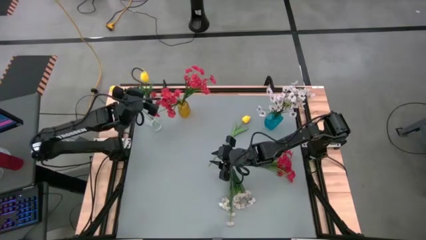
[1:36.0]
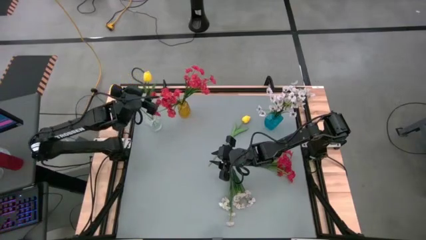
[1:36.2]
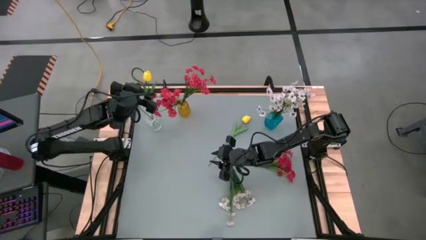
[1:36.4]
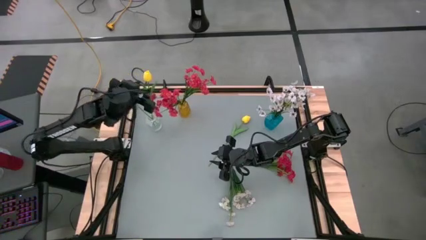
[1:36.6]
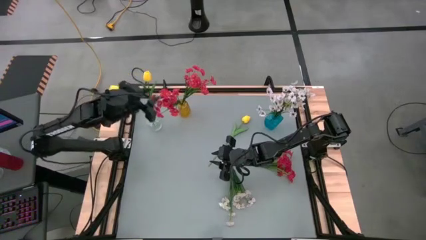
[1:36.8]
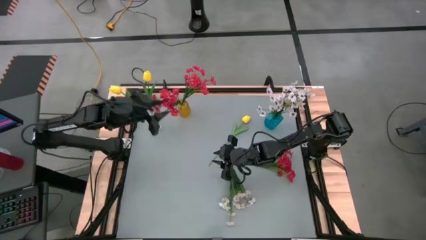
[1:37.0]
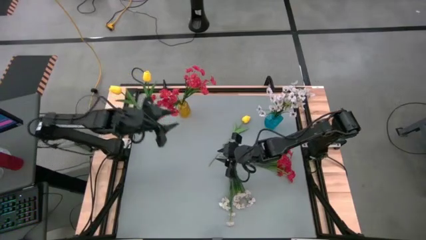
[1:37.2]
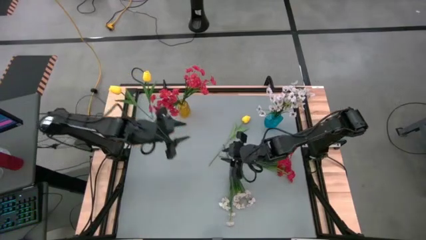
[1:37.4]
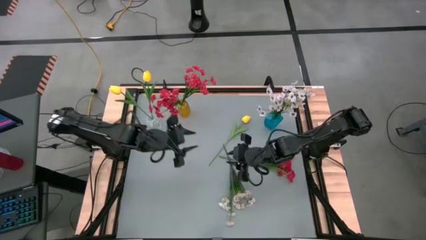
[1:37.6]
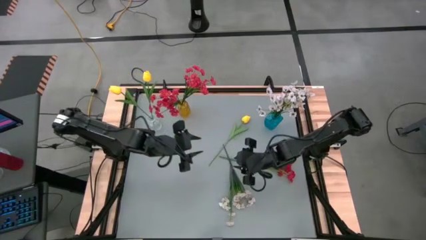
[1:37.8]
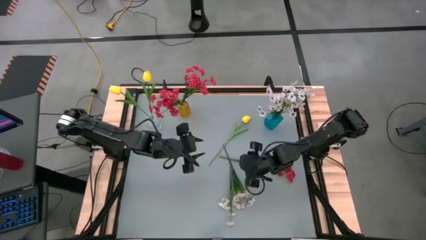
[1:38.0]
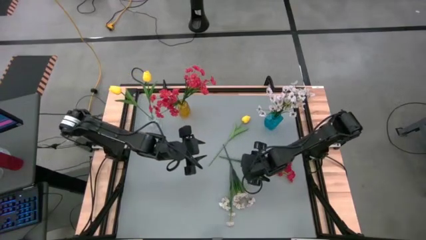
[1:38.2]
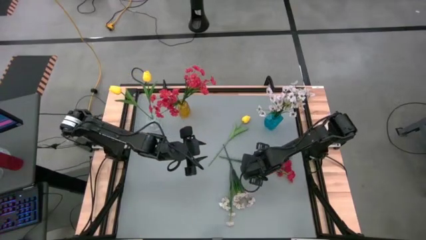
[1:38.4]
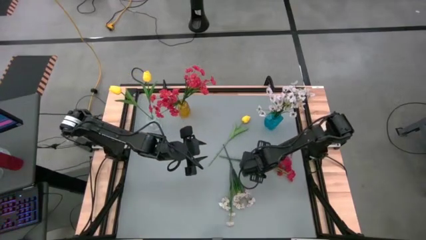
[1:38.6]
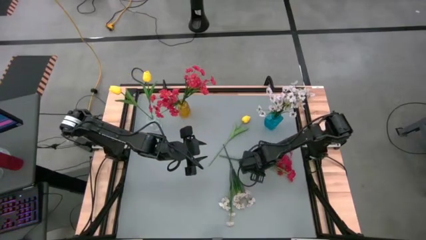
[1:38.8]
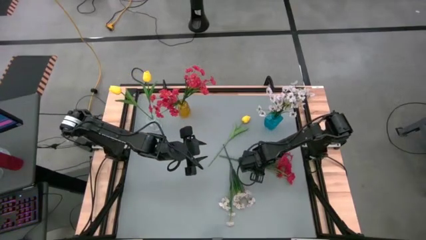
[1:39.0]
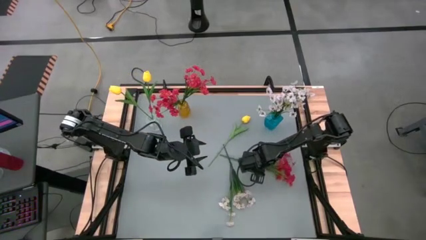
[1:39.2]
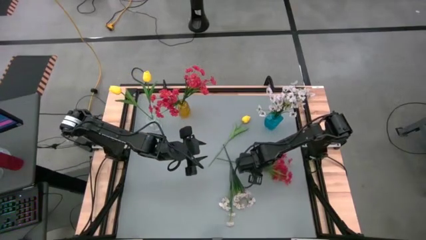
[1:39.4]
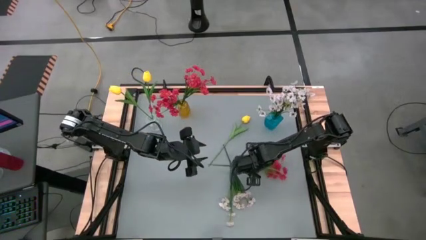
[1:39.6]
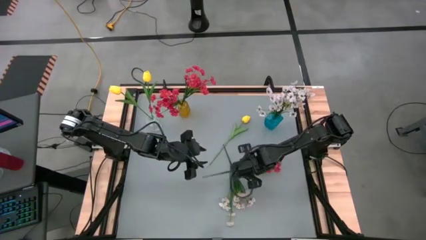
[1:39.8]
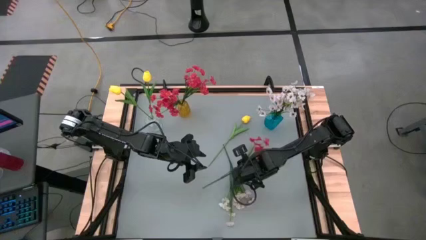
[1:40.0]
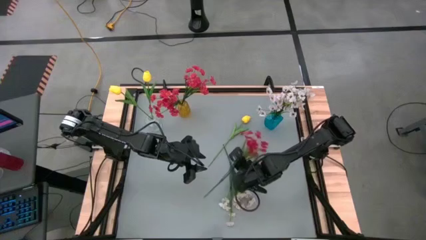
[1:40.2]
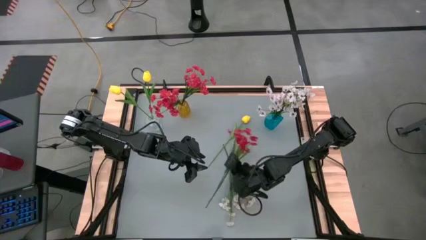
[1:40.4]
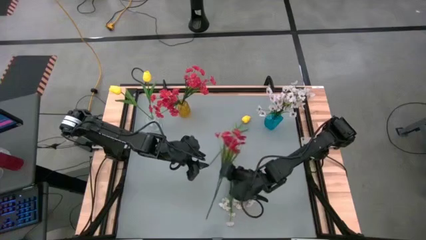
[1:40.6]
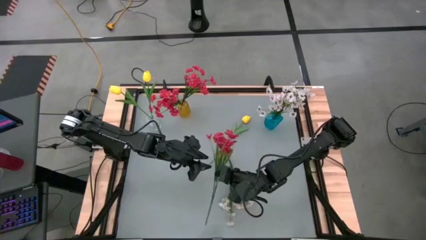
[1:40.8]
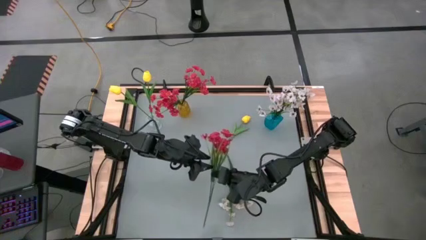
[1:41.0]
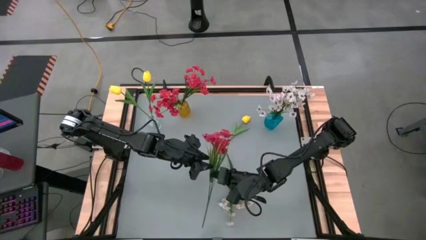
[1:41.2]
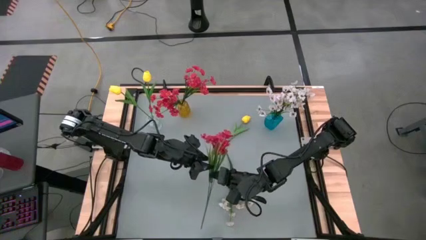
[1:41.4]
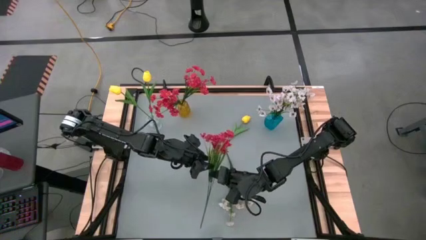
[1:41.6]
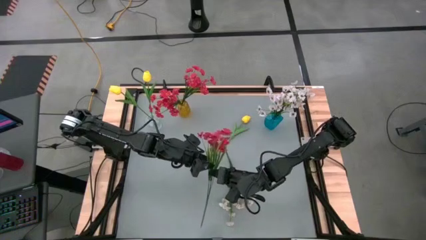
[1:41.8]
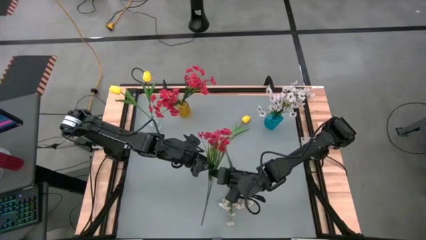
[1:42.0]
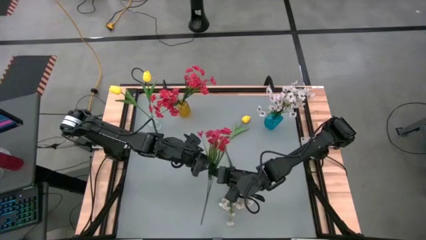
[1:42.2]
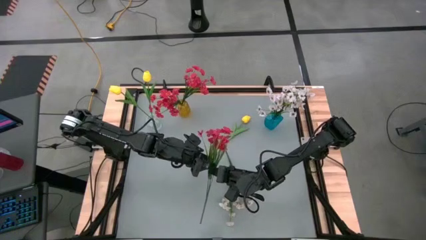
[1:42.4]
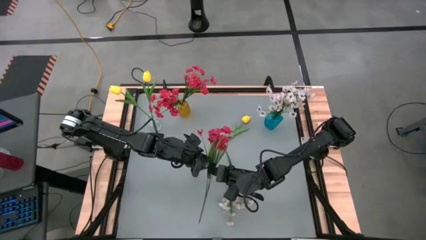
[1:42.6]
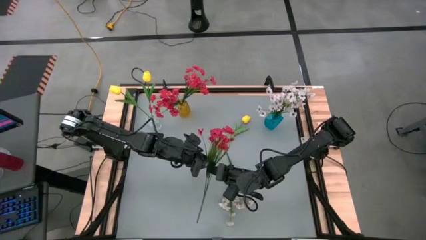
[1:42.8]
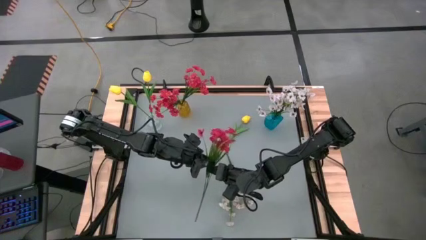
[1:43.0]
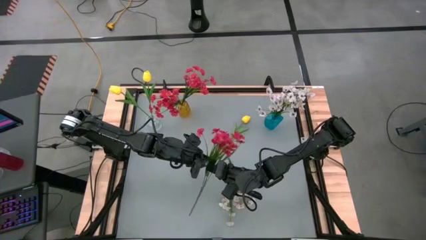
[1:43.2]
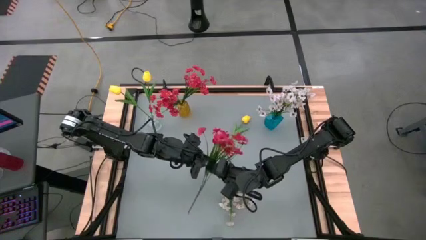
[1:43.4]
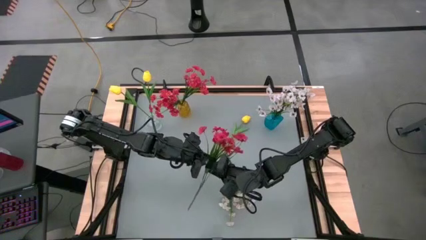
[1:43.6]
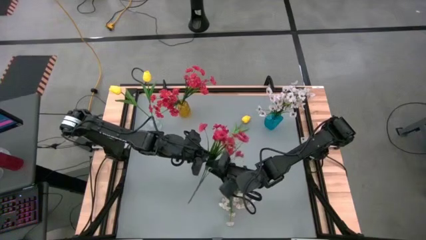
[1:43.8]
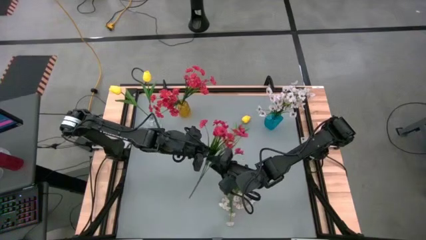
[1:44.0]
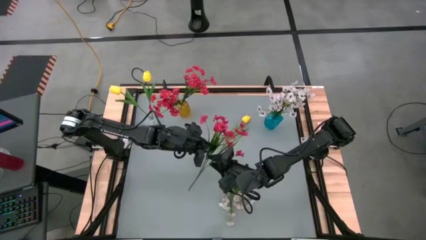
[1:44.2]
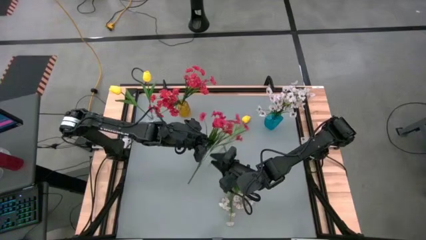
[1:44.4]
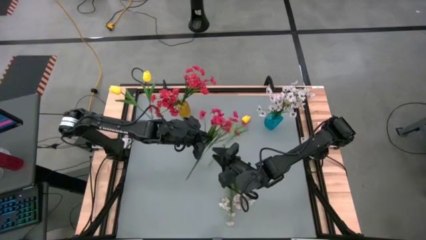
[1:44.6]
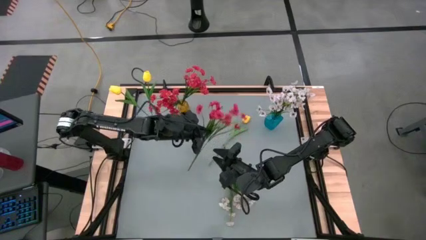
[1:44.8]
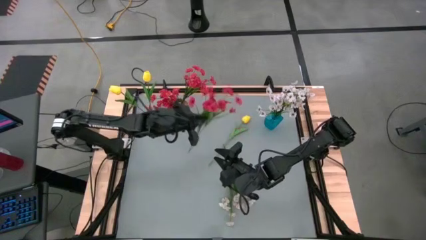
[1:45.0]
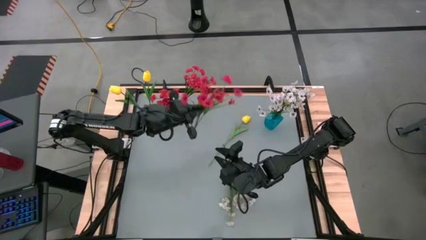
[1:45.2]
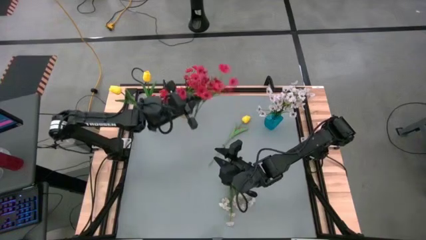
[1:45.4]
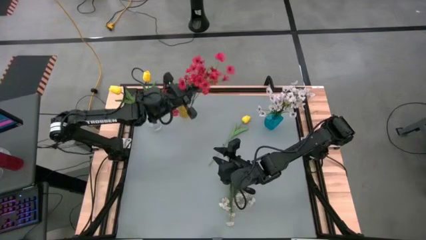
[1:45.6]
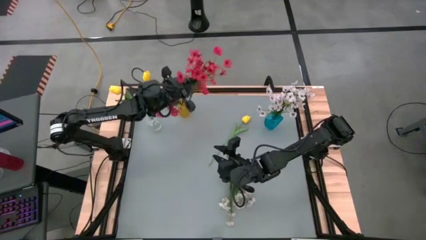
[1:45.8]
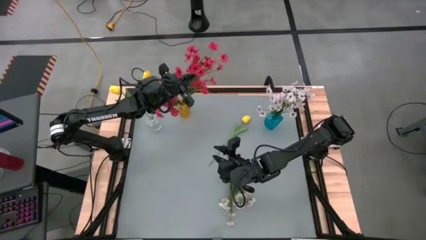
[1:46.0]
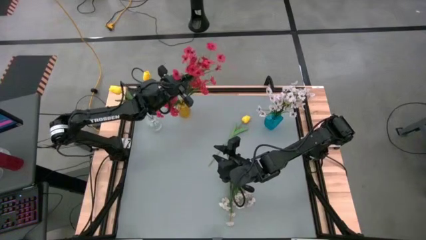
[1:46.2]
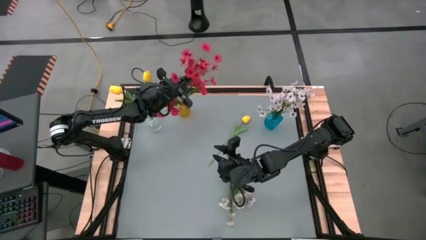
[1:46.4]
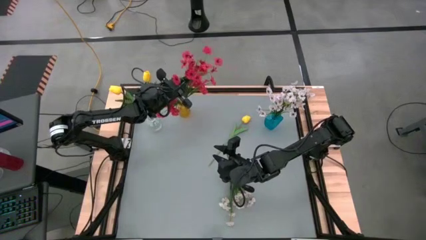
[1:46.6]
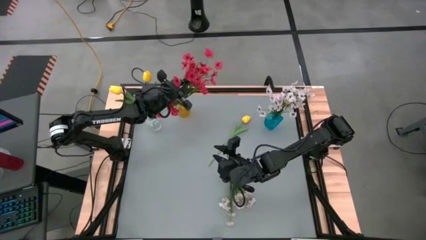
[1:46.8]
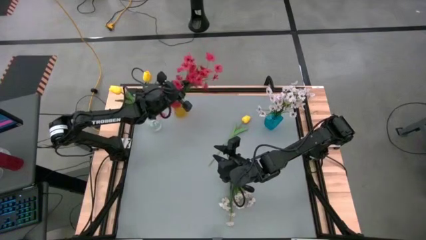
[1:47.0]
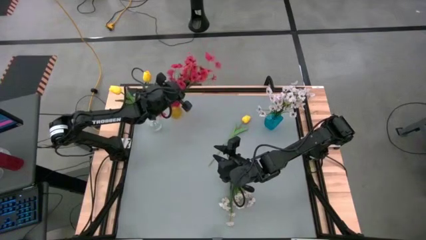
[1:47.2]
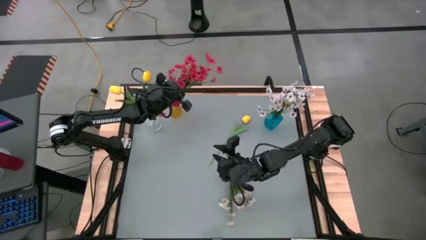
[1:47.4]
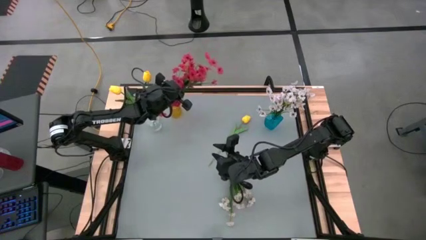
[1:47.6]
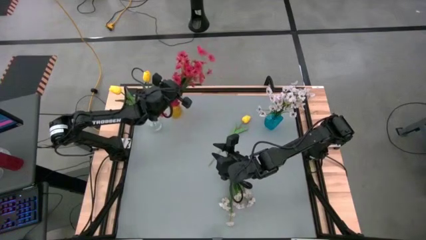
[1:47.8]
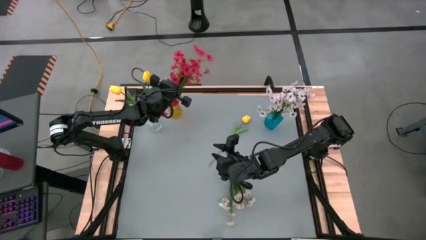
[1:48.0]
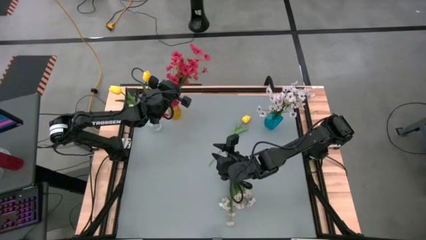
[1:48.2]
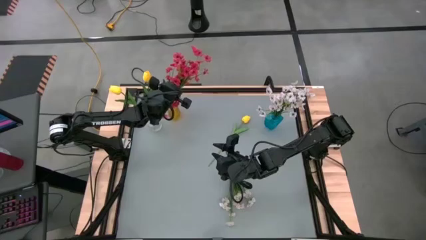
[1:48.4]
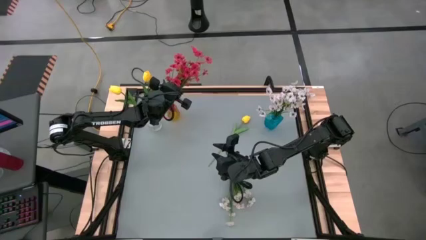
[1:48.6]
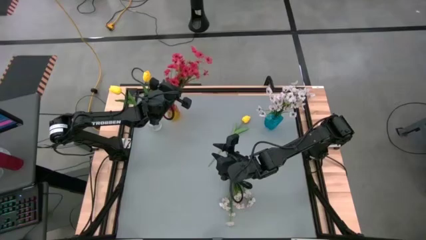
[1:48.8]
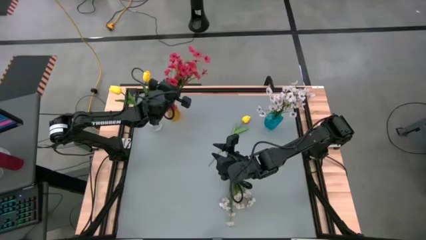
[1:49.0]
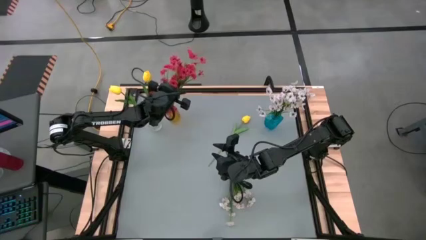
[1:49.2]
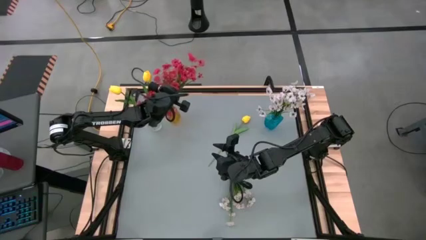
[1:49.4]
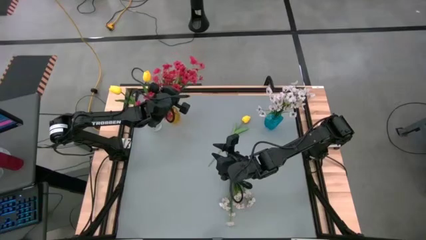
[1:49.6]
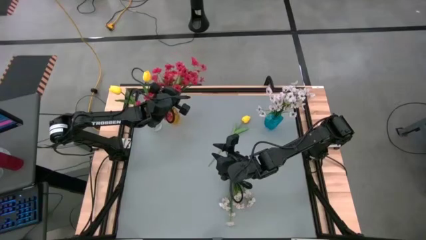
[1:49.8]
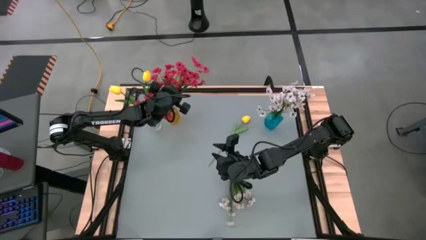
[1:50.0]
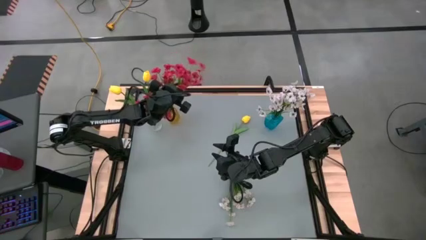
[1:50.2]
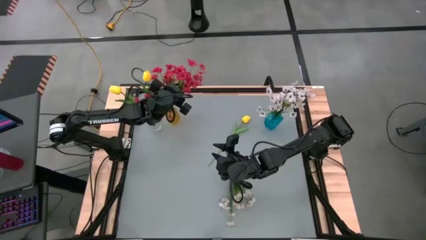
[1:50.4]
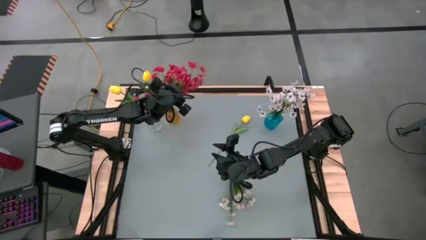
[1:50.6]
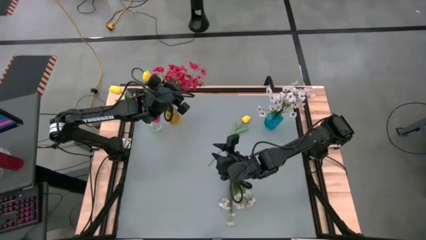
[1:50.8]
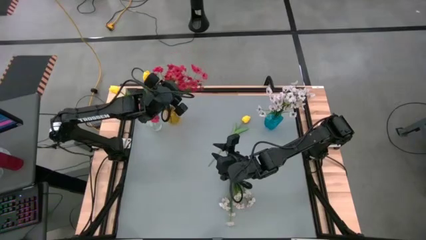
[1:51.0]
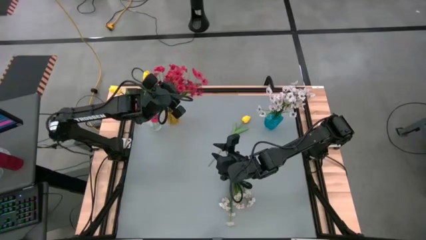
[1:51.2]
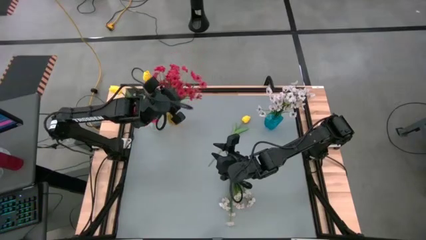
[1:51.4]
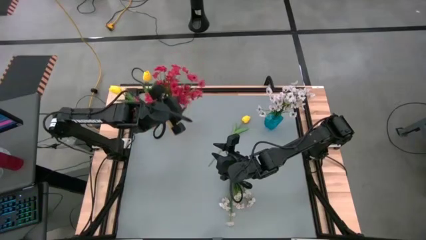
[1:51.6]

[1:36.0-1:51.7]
Task: Sort flowers into vase by color
Put the red flowers into the yellow vase
